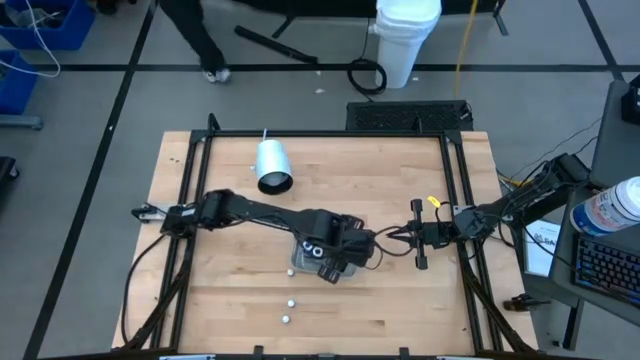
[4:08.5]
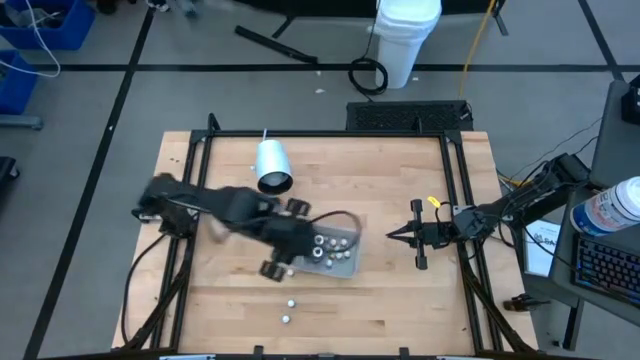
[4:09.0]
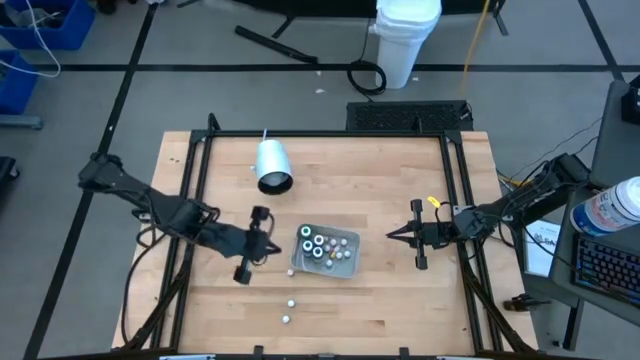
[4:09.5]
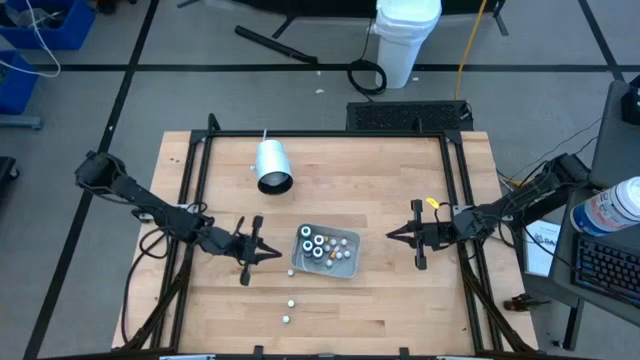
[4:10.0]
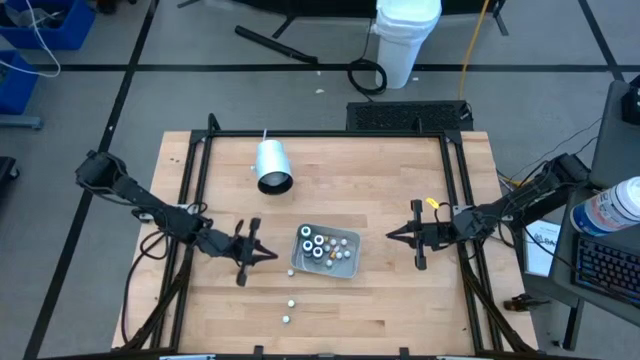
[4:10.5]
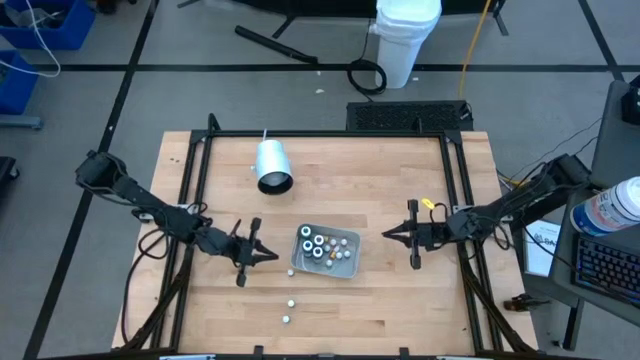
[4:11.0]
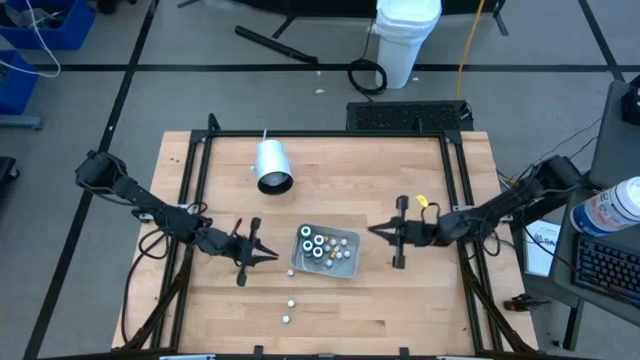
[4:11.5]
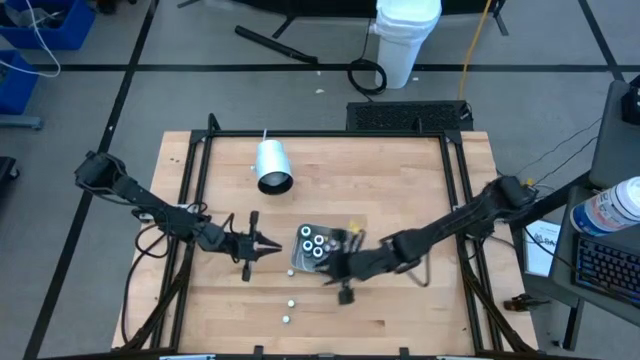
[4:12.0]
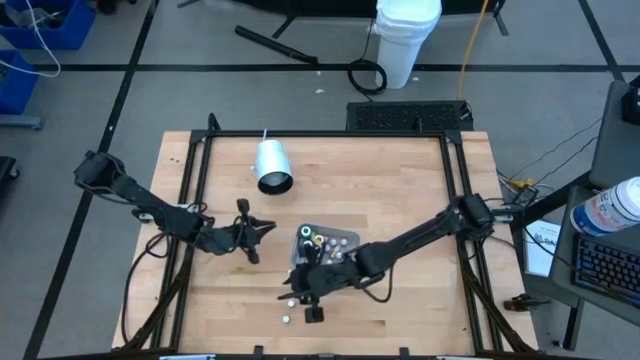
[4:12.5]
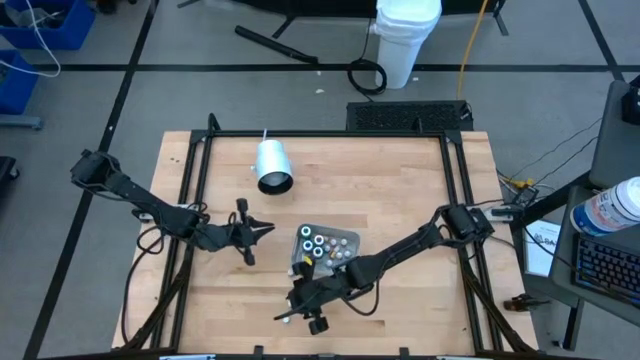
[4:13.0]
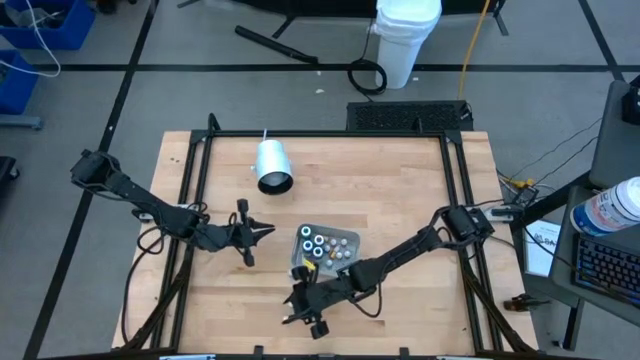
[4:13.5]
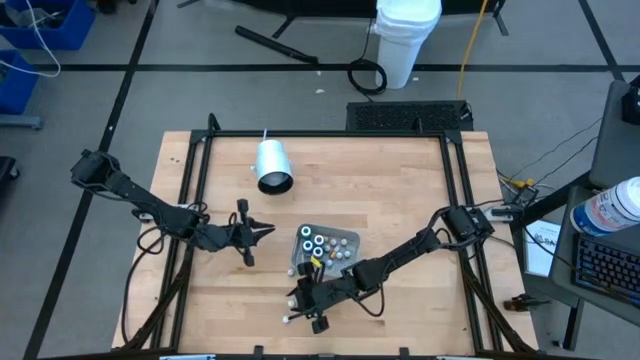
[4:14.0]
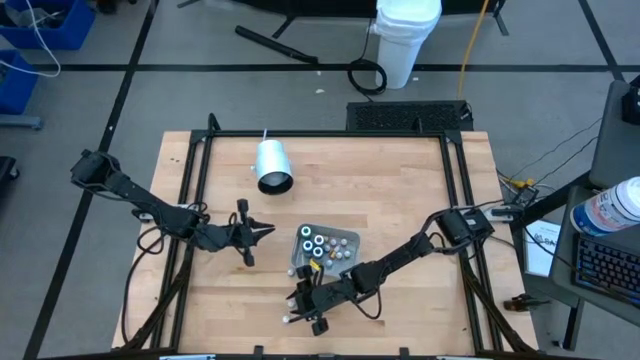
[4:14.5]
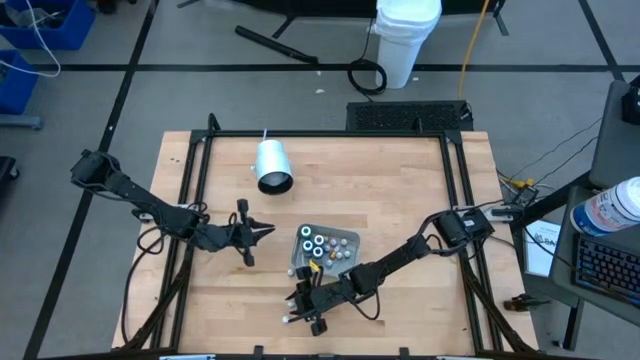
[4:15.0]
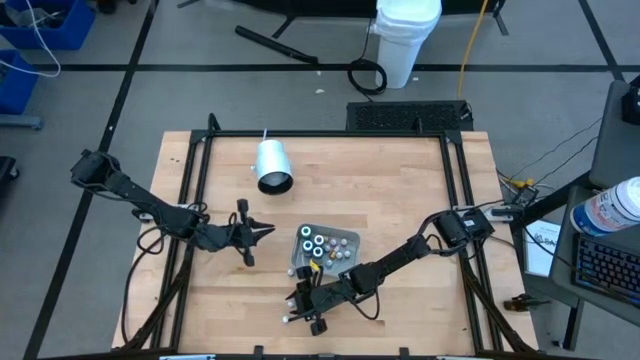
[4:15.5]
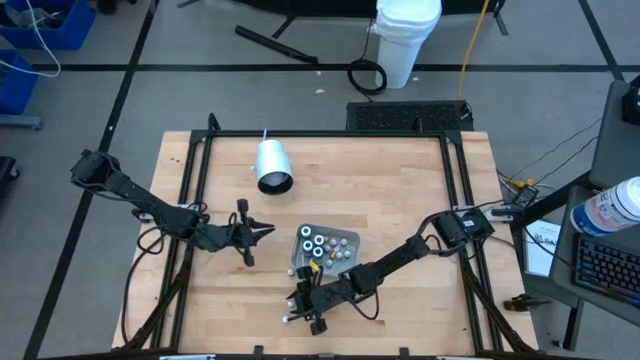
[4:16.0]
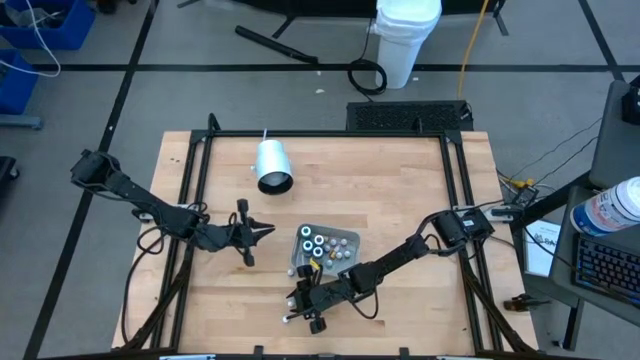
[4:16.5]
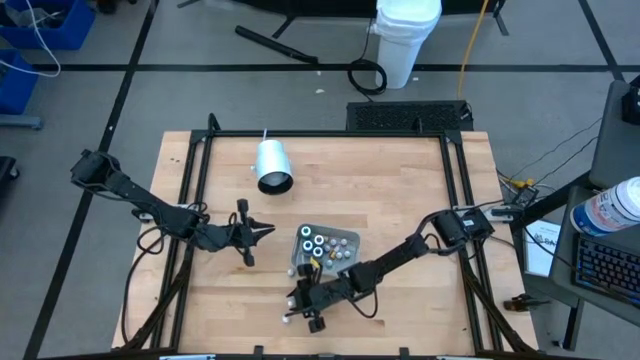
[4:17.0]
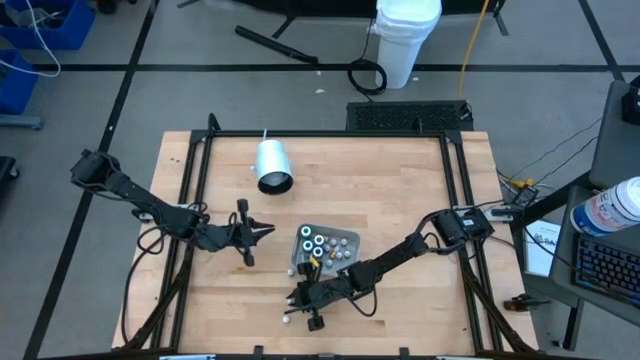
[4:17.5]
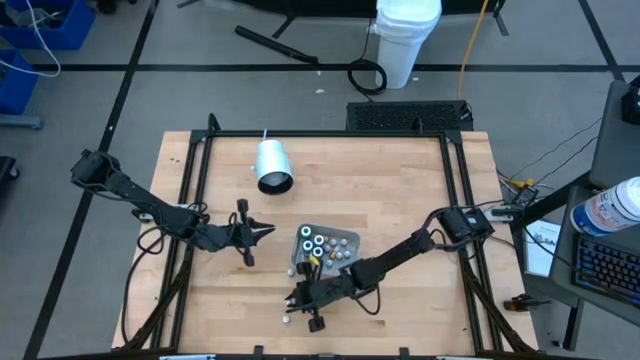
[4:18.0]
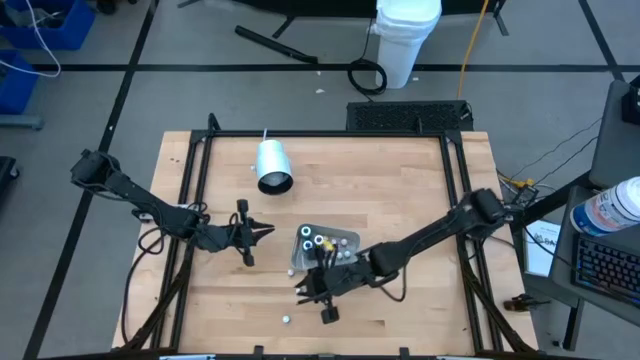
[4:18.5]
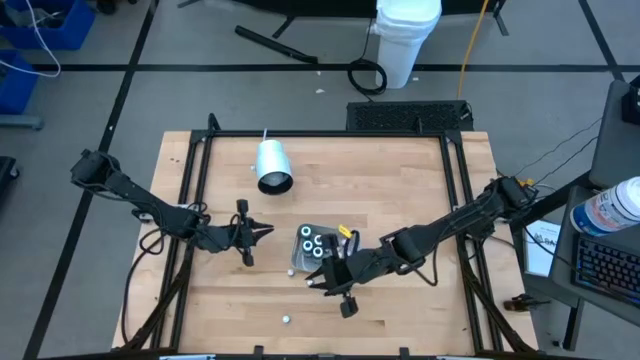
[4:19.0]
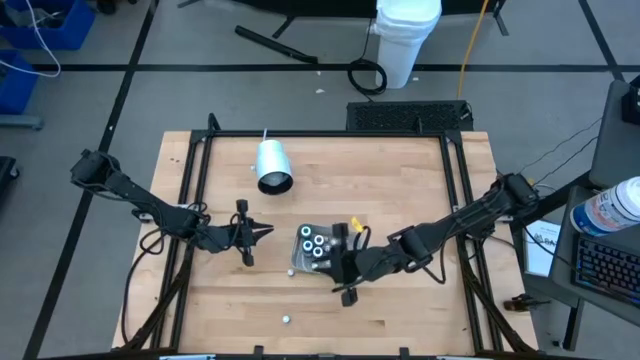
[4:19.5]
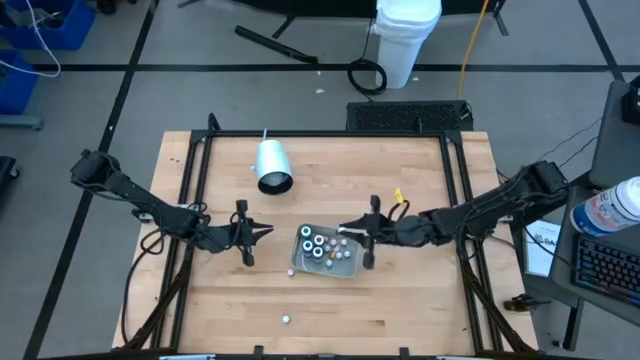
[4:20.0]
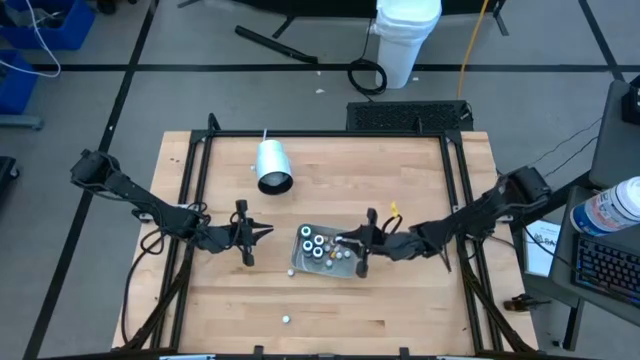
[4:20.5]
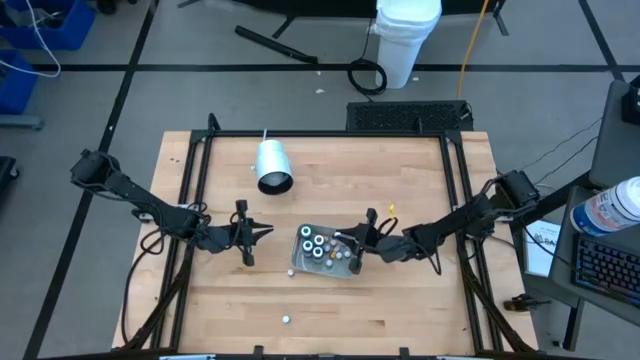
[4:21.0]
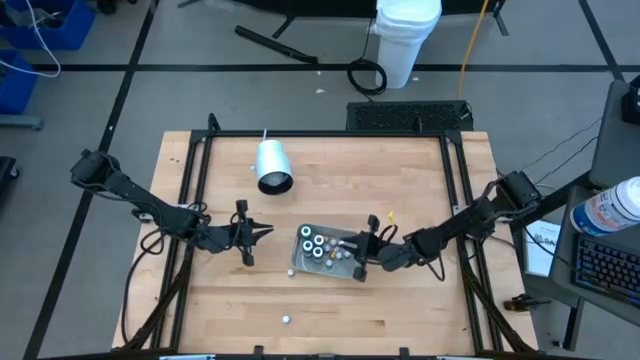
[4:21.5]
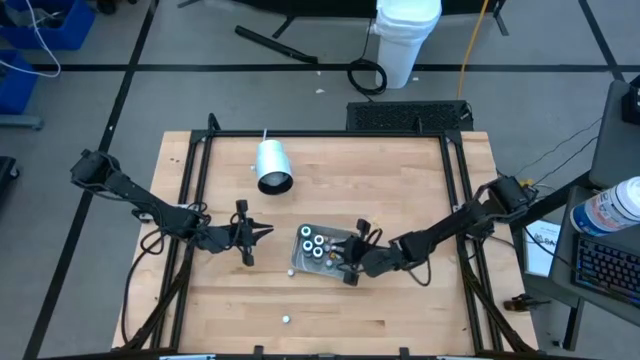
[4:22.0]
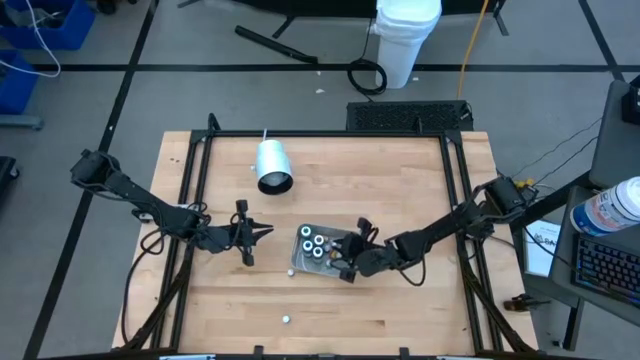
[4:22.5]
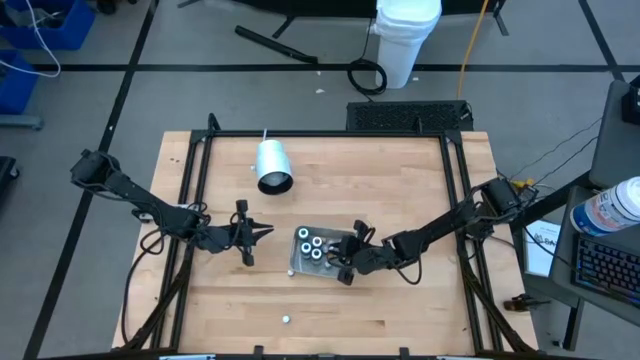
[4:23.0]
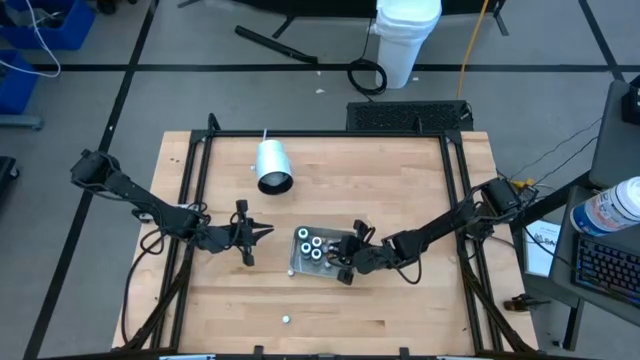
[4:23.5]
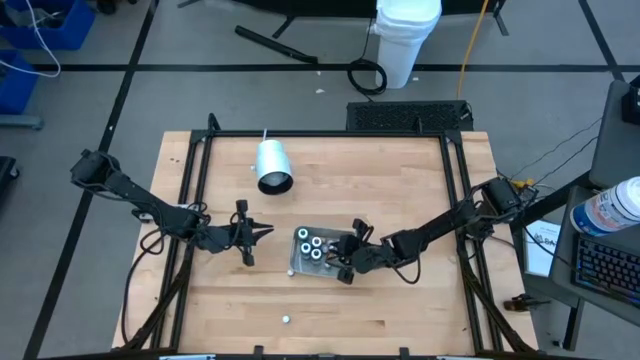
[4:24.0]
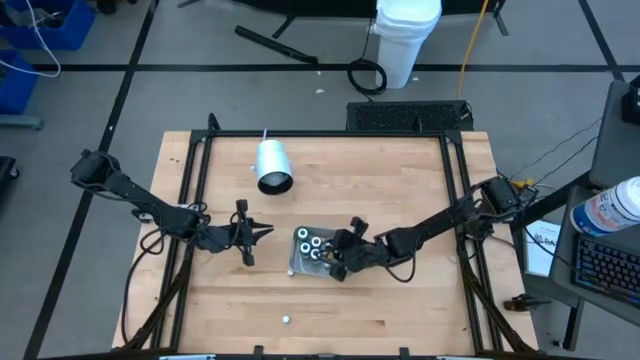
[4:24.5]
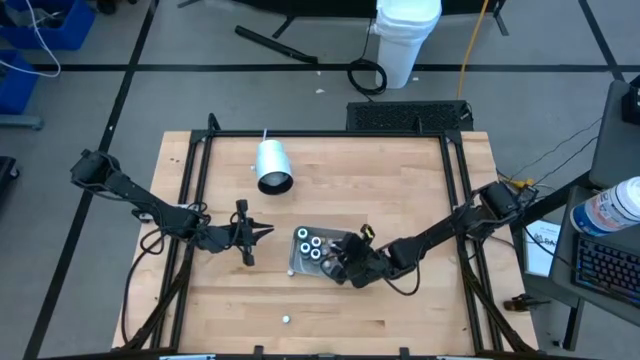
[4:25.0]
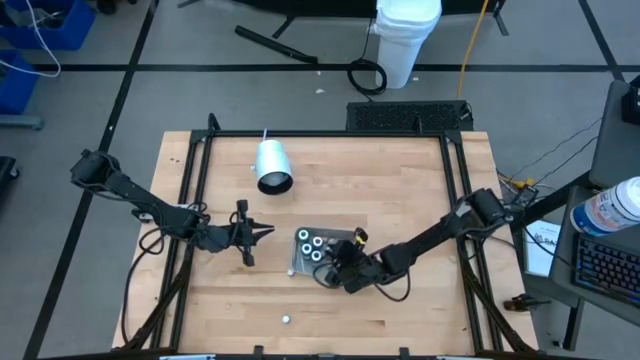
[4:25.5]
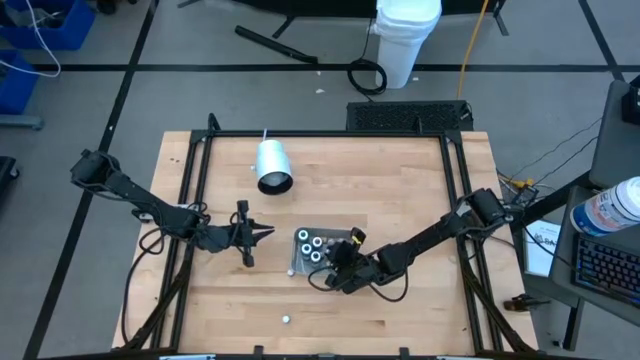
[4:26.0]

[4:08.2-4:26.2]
Task: Pick & Place food coloring
Put the red food coloring bottle into the gray bin
